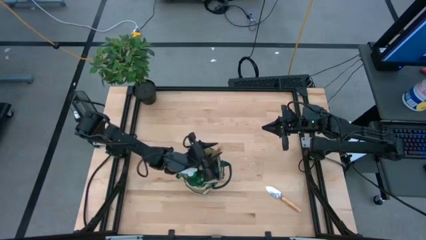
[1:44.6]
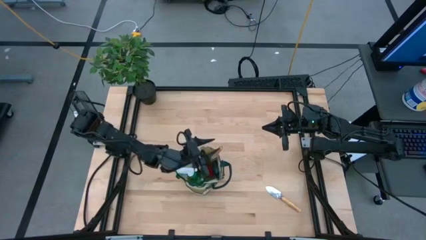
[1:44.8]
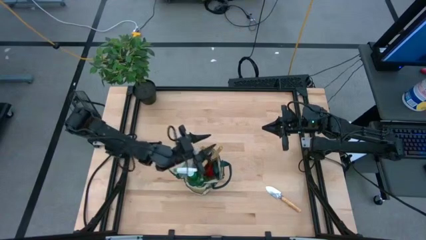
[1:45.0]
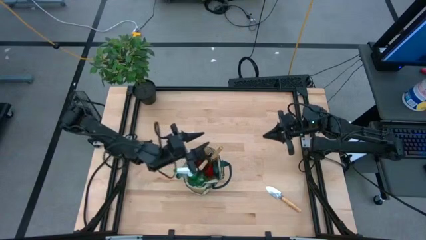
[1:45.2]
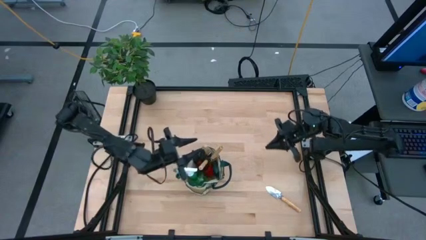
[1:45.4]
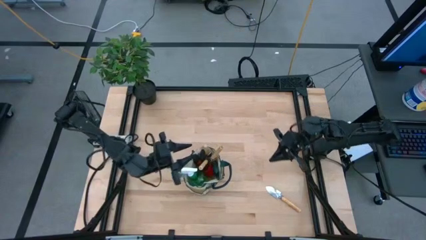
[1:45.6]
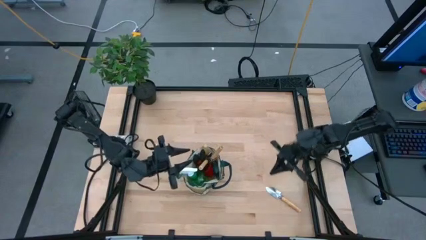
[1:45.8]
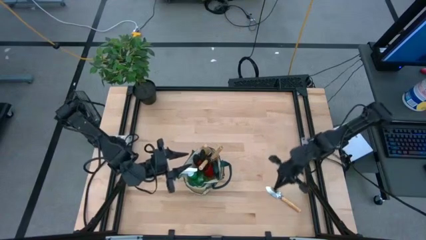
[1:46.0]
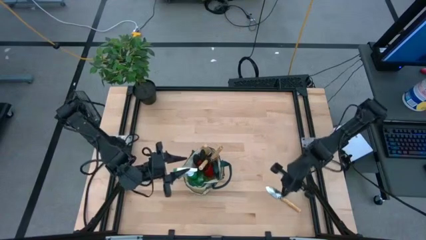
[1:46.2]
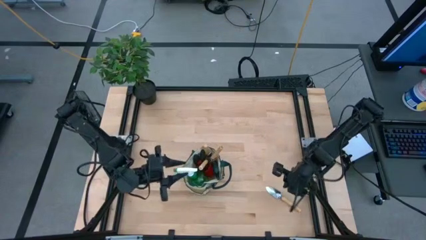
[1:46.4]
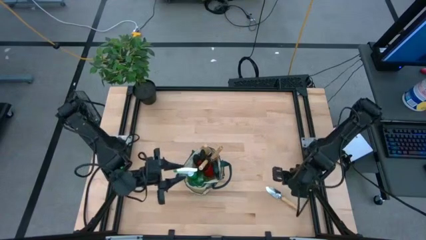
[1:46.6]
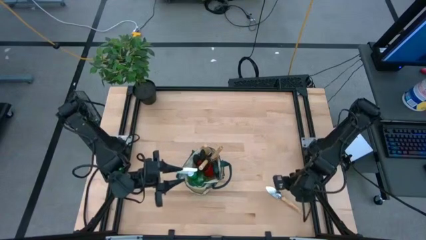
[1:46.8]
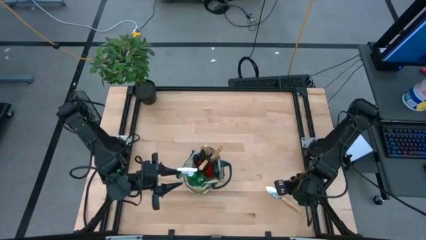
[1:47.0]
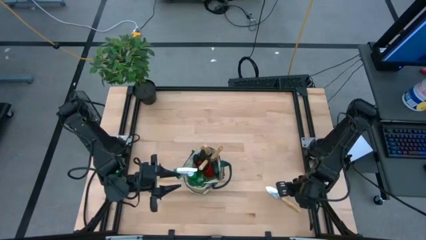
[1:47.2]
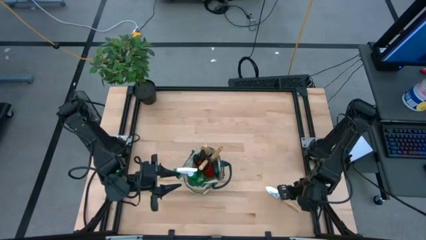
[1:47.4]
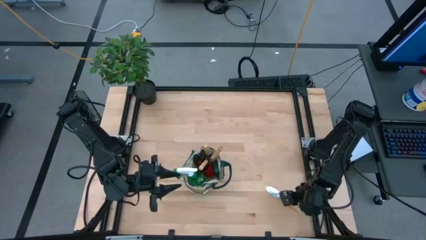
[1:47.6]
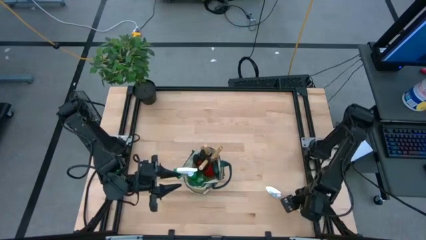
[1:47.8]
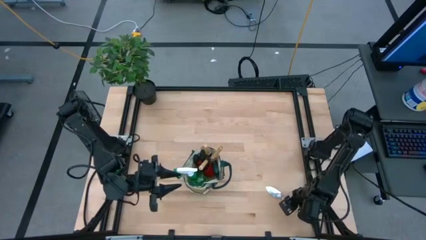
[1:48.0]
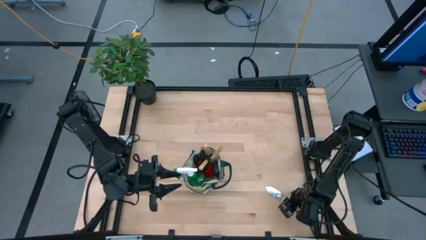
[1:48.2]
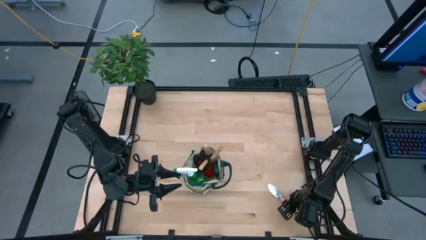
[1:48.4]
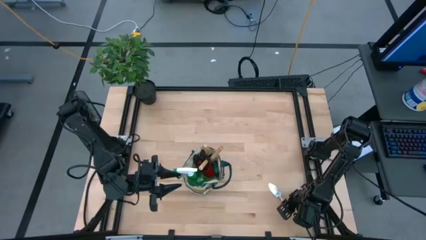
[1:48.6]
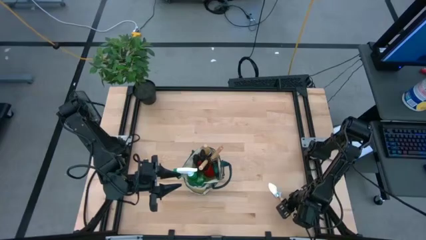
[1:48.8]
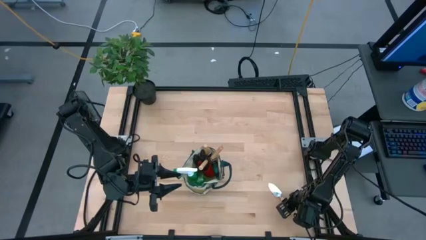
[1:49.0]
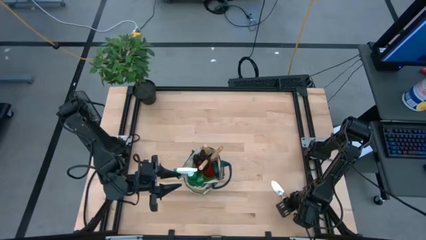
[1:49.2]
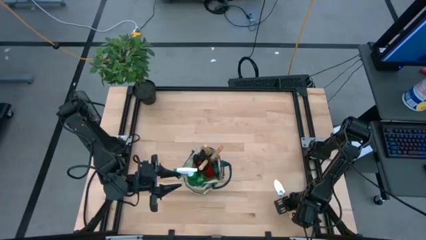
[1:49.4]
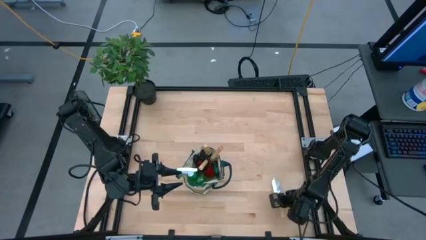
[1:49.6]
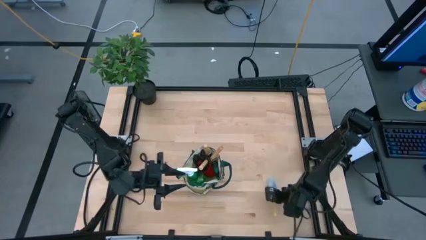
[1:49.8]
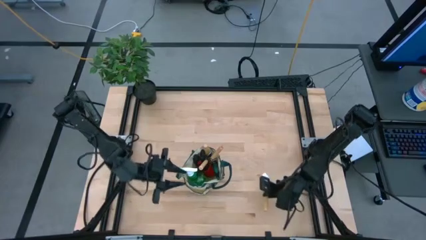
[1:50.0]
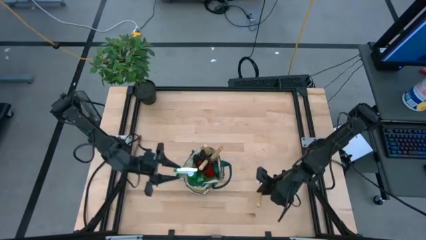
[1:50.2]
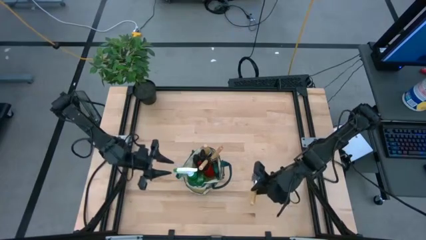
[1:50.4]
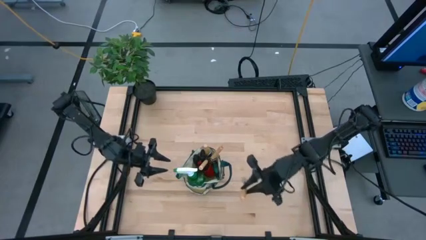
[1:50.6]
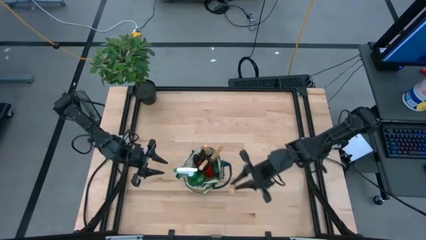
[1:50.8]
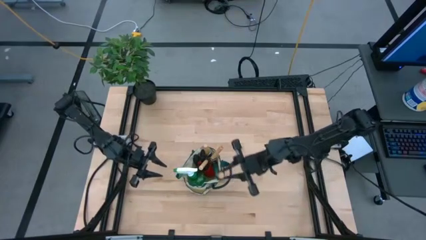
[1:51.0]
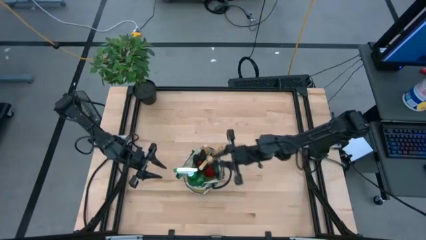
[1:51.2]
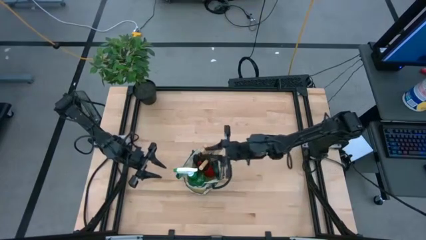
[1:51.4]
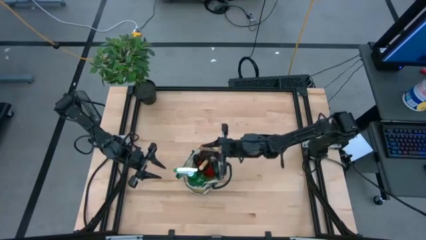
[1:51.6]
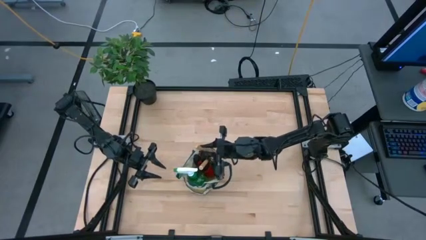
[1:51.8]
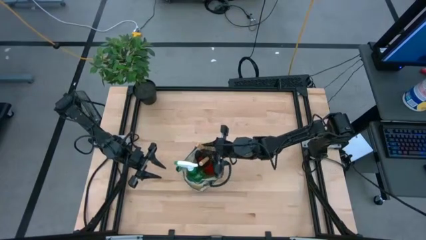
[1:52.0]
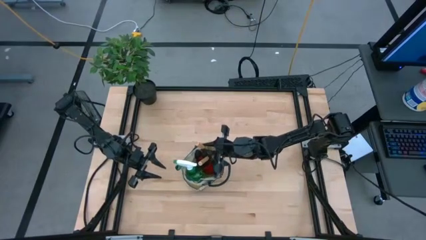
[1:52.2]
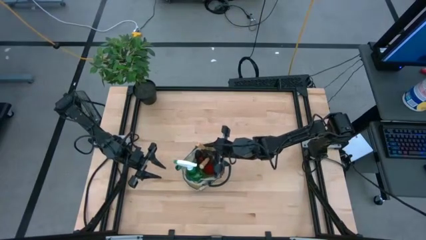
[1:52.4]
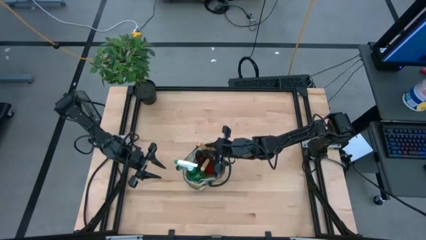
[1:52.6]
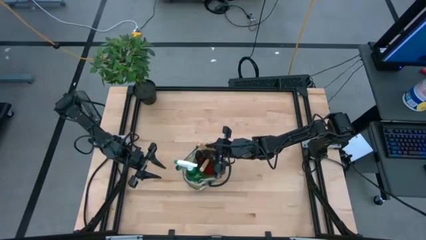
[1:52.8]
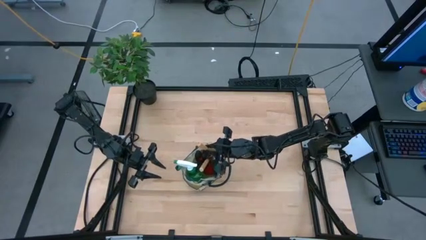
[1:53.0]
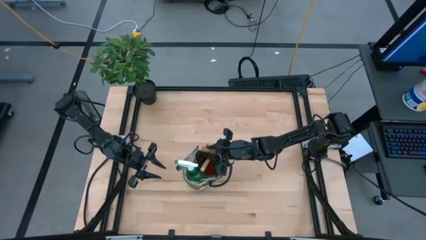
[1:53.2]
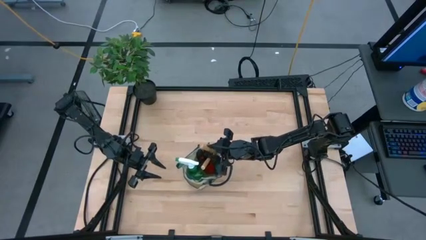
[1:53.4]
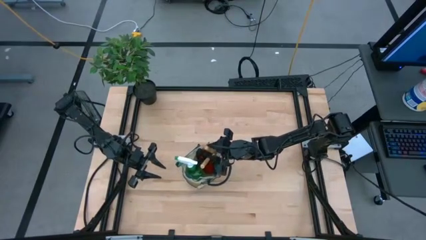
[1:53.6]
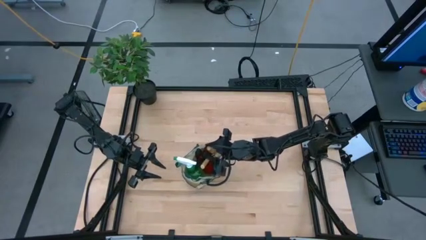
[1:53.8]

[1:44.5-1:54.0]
Task: Pick & Place Garden tools in Gardening bag
Put the trowel into the gardening bag

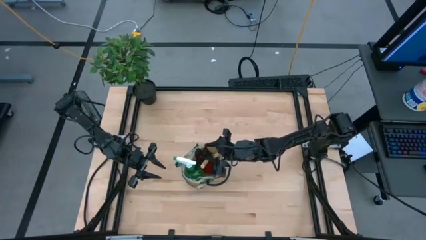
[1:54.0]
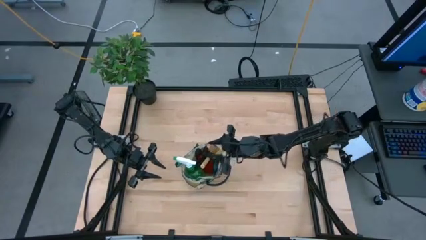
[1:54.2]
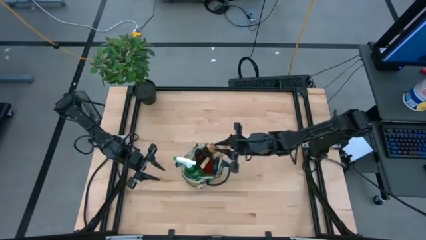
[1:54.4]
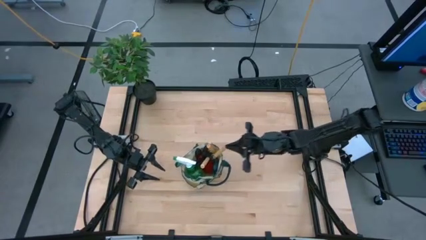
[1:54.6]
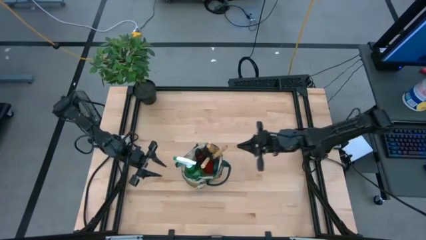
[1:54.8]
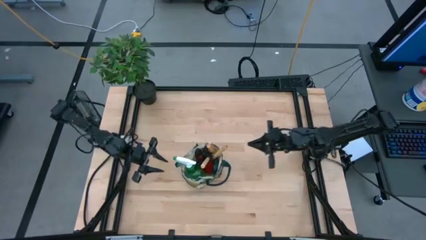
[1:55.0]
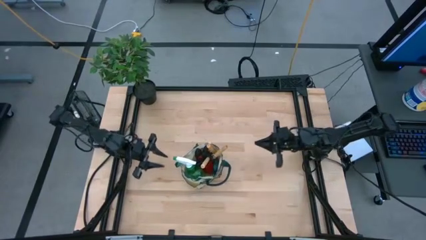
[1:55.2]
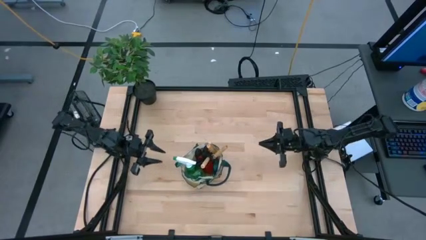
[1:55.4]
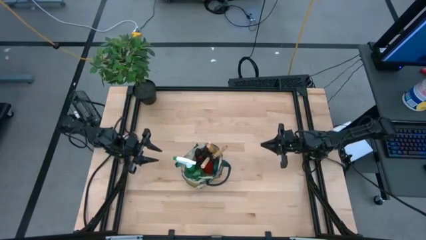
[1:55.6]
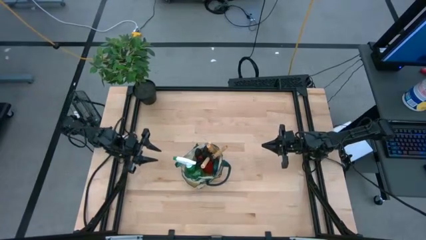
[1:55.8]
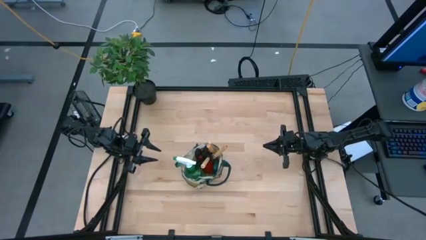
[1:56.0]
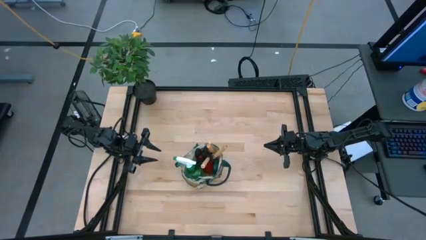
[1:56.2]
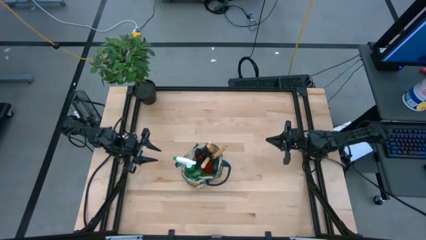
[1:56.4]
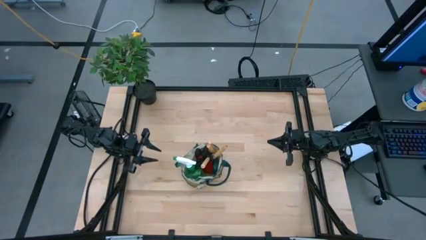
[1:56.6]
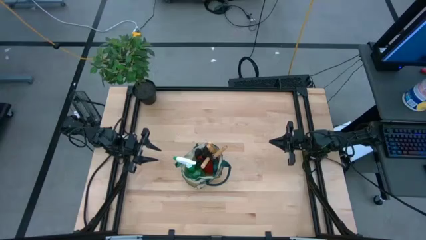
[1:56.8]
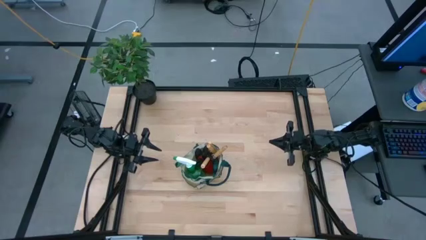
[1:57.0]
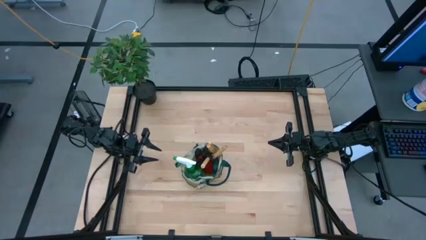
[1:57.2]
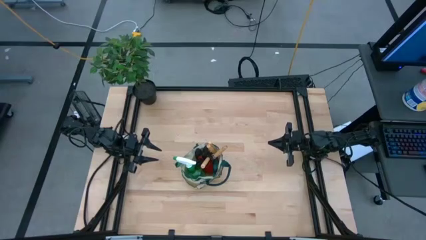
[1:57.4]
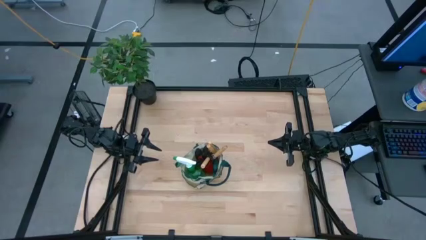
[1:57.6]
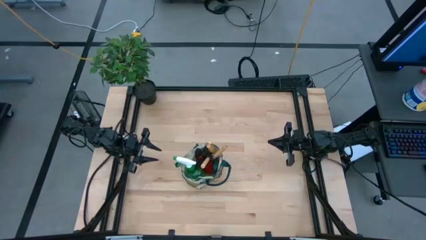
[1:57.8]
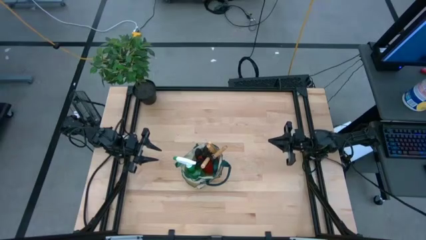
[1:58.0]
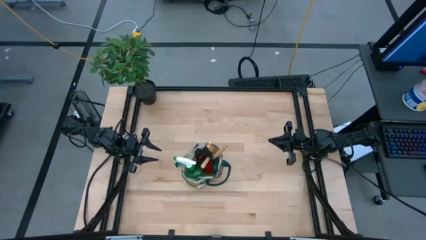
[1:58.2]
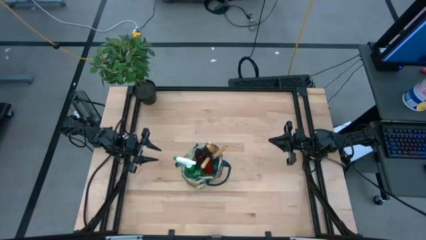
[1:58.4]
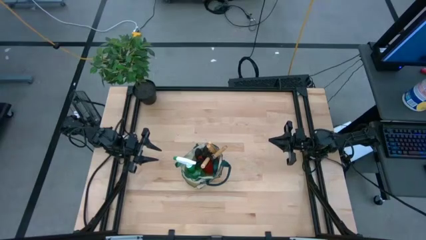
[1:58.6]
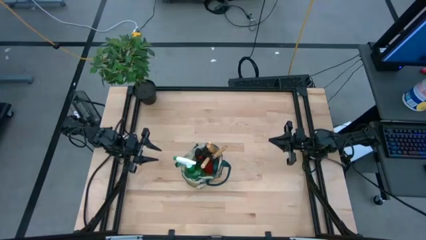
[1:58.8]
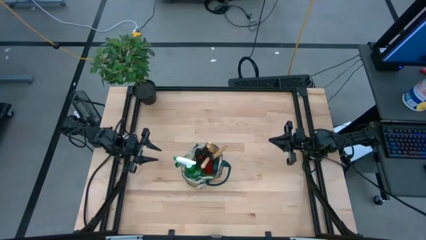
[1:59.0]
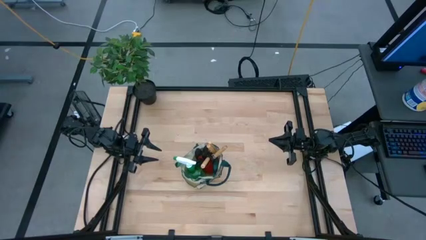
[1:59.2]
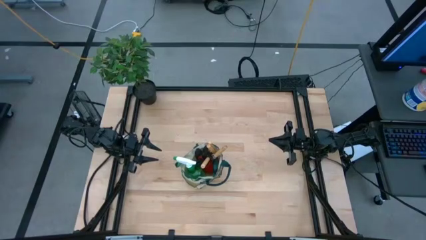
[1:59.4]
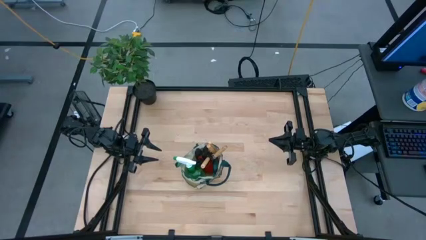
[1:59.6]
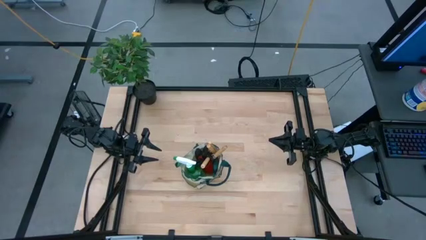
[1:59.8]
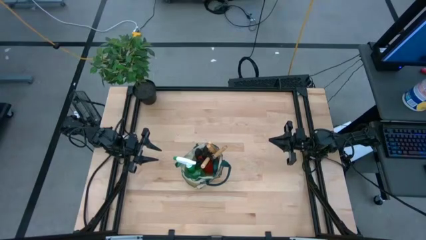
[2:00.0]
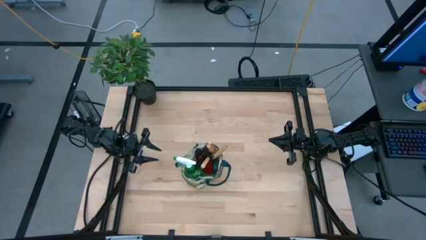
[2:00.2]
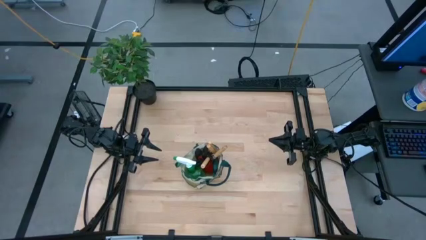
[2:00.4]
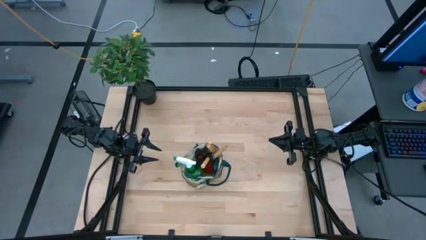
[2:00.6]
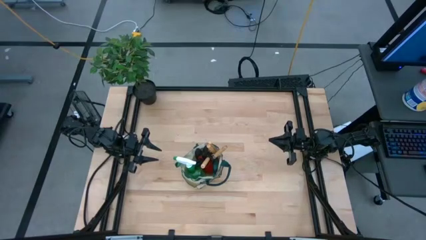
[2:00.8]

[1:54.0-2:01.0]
Return to Home Position

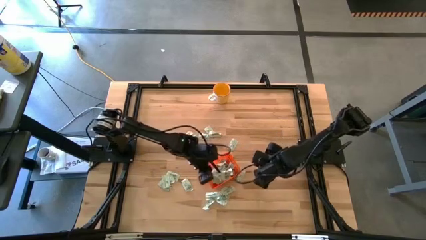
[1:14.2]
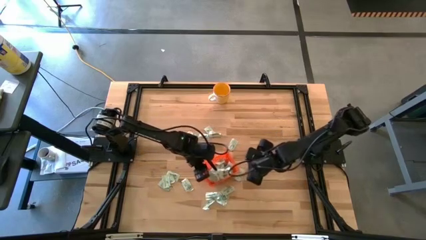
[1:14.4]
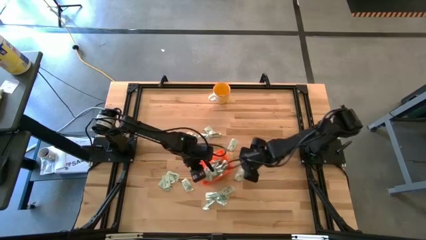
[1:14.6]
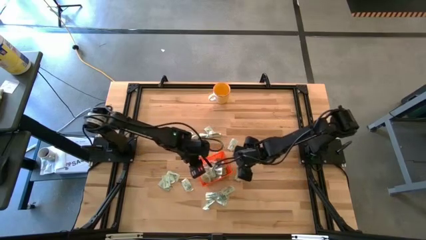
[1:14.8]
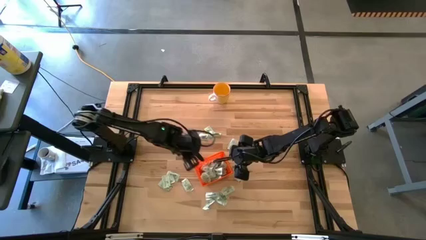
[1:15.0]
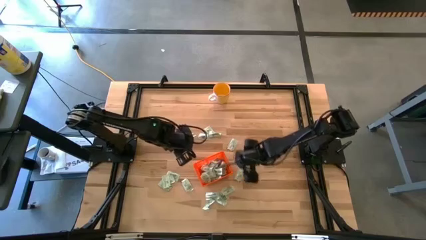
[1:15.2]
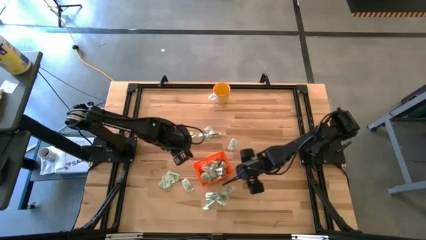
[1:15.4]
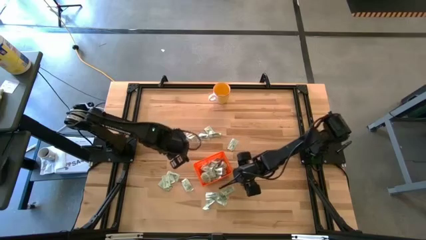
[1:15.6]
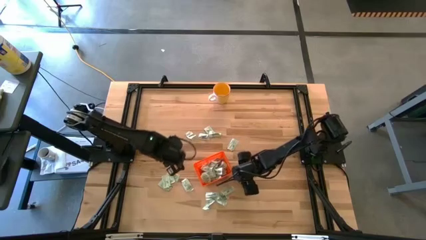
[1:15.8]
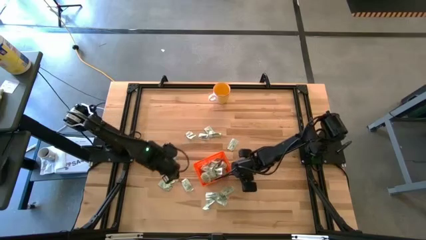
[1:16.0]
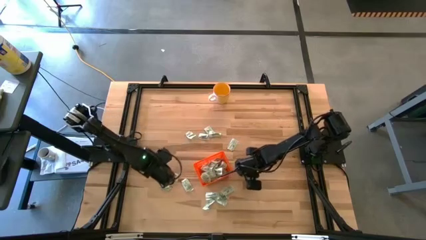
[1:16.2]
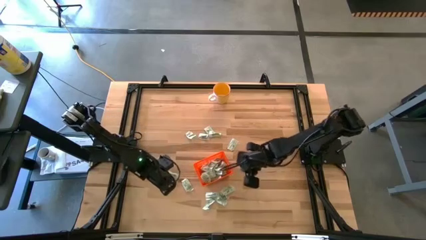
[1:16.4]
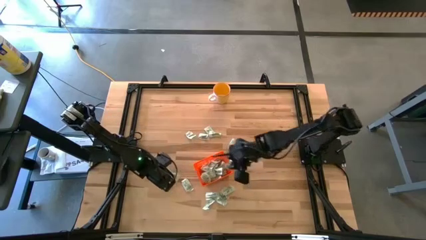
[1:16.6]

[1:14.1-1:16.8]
Task: Pick and place Stevia / Truvia into bins
Put the stevia packet into the bin
